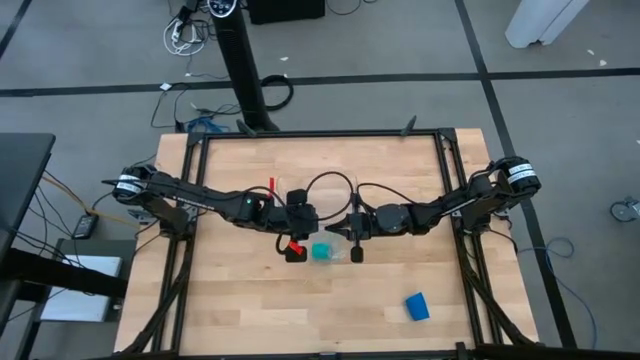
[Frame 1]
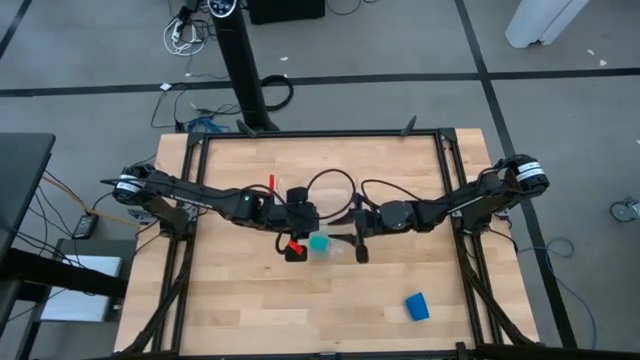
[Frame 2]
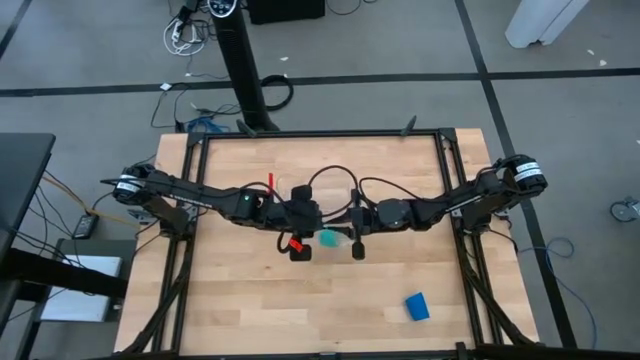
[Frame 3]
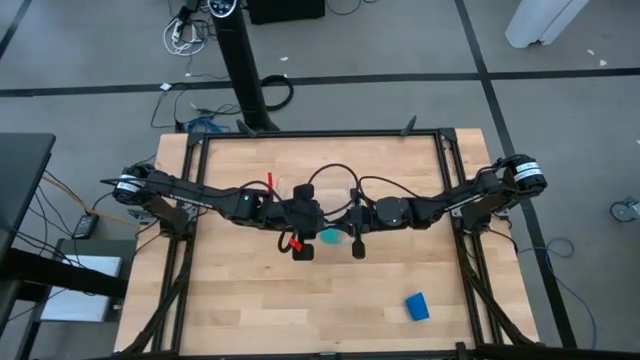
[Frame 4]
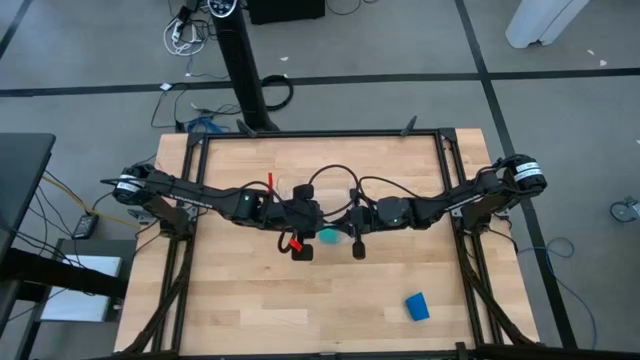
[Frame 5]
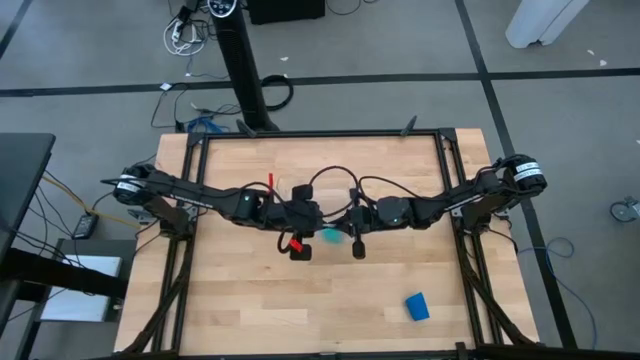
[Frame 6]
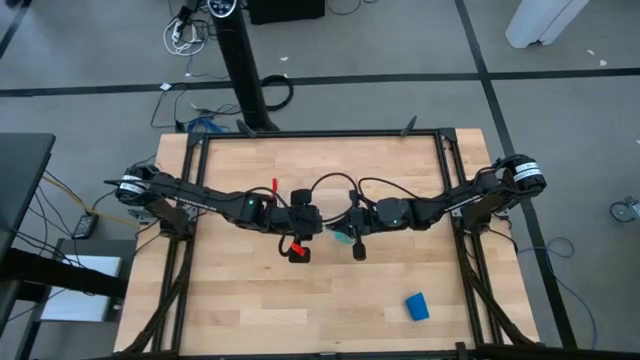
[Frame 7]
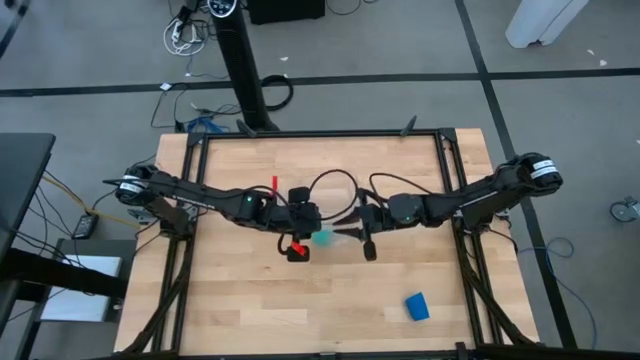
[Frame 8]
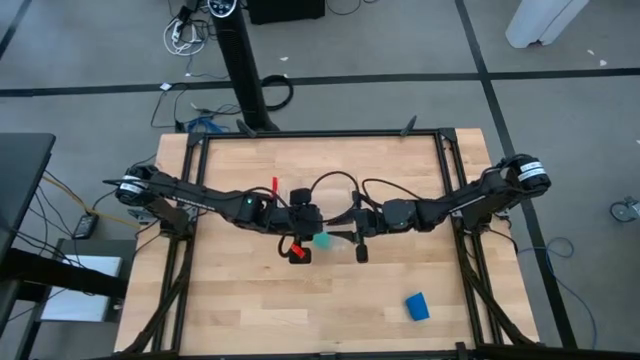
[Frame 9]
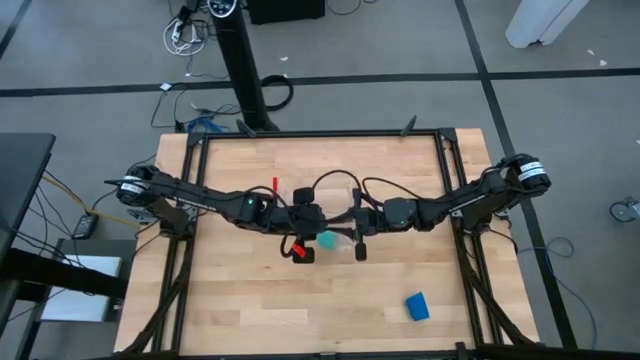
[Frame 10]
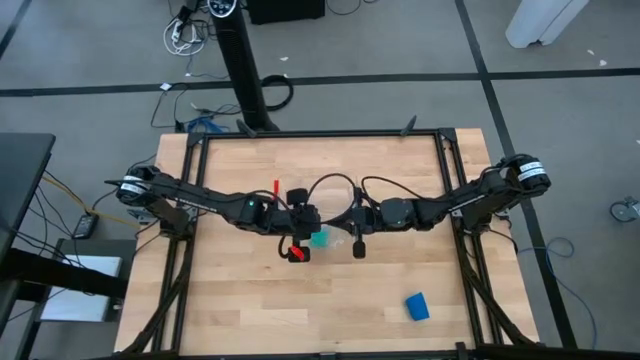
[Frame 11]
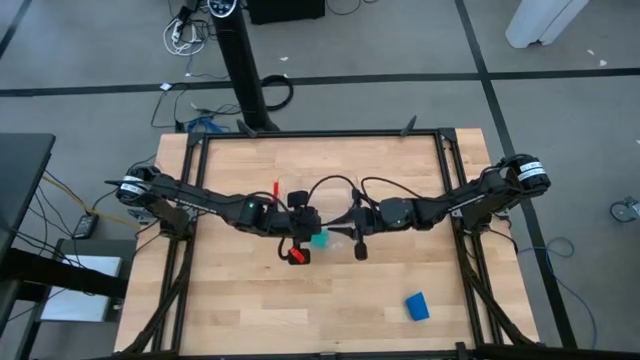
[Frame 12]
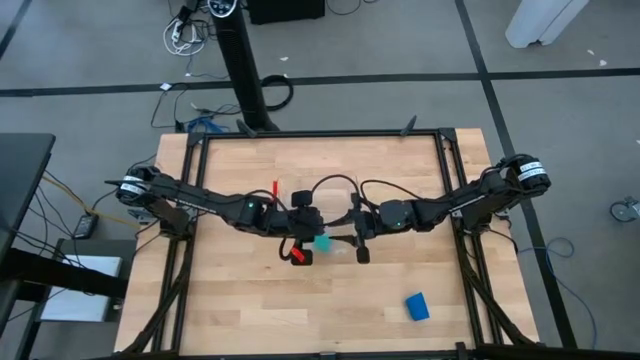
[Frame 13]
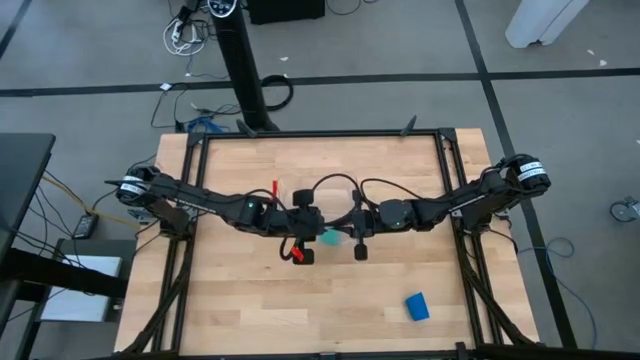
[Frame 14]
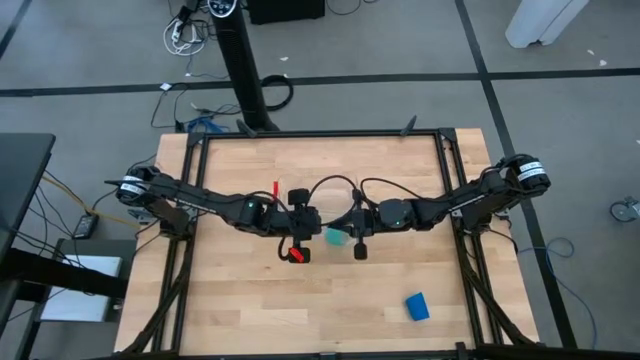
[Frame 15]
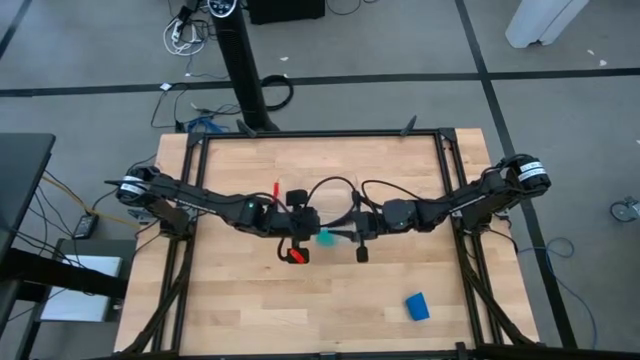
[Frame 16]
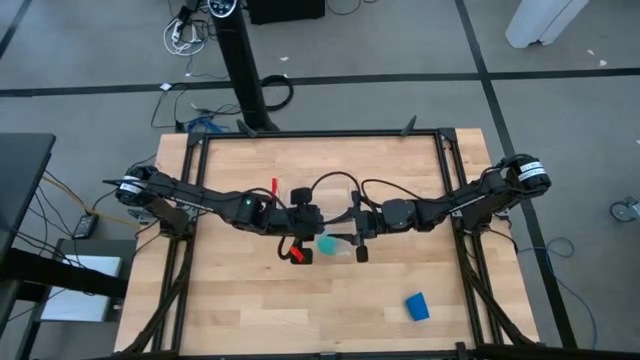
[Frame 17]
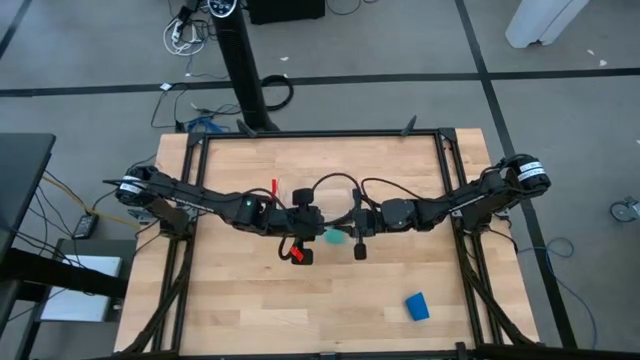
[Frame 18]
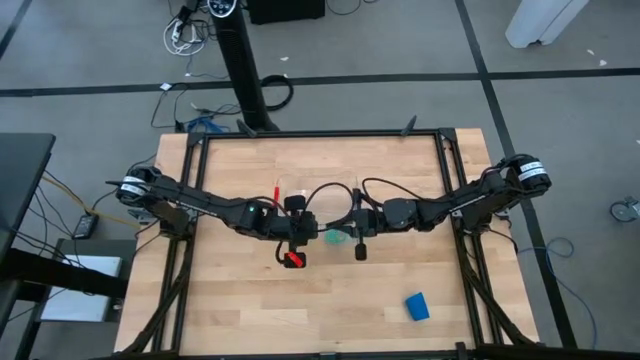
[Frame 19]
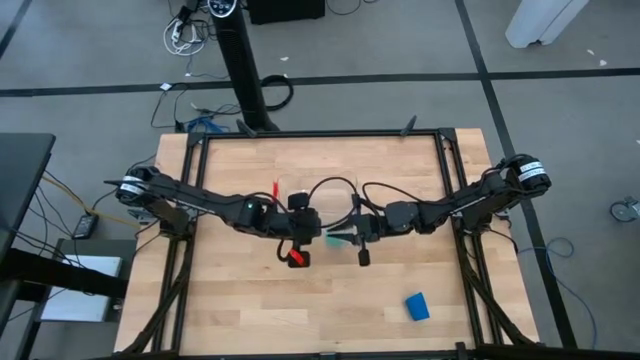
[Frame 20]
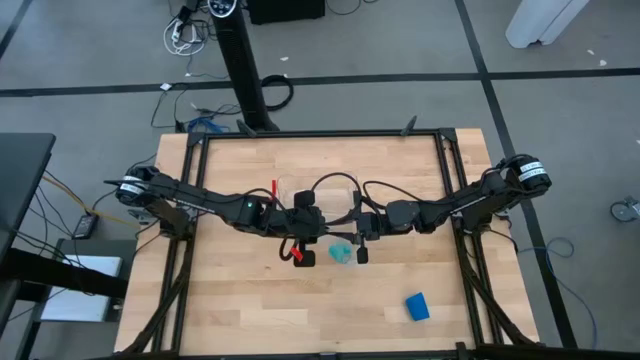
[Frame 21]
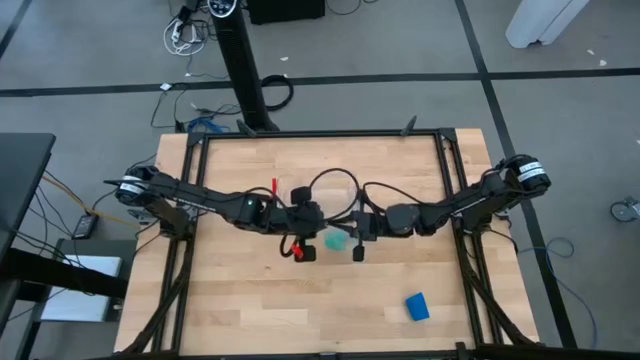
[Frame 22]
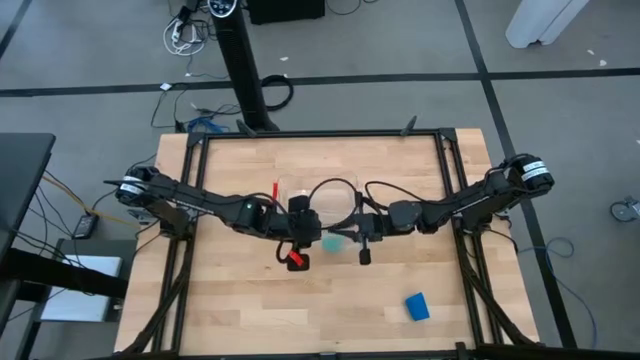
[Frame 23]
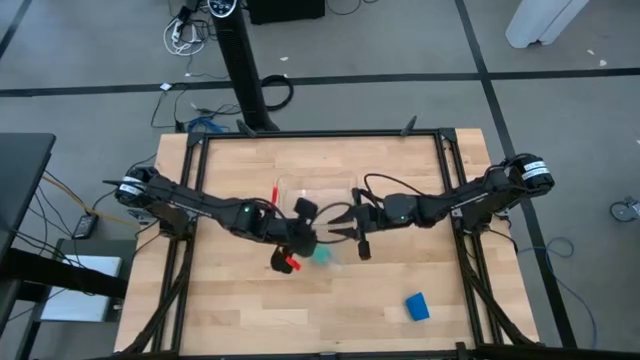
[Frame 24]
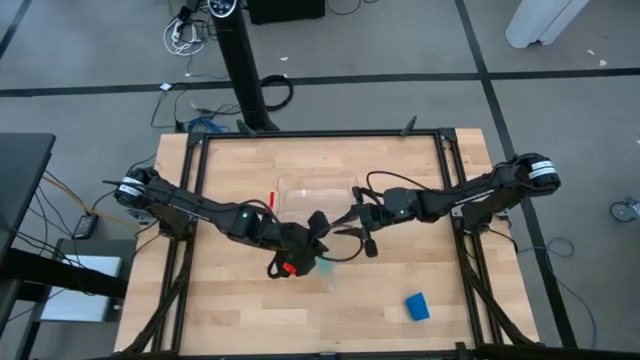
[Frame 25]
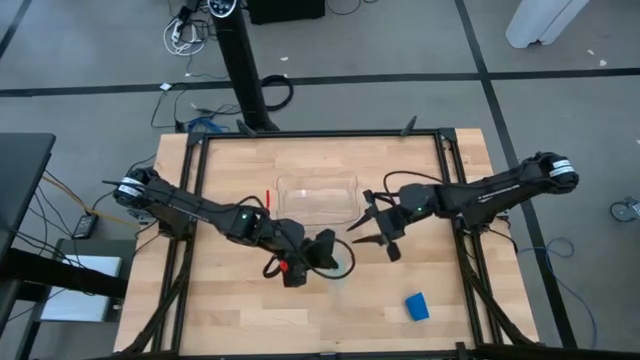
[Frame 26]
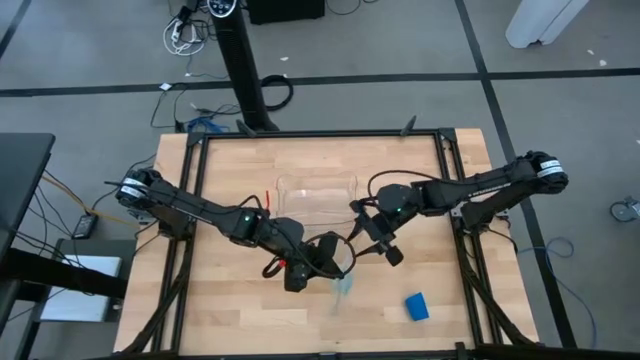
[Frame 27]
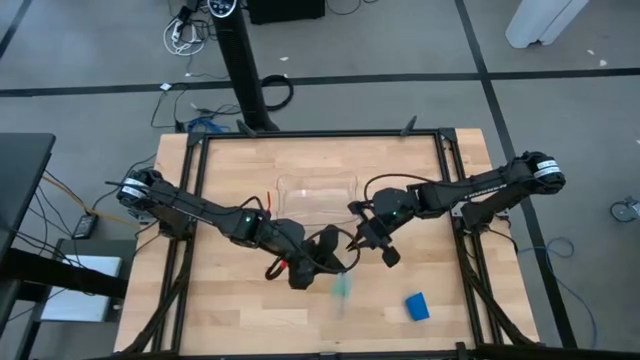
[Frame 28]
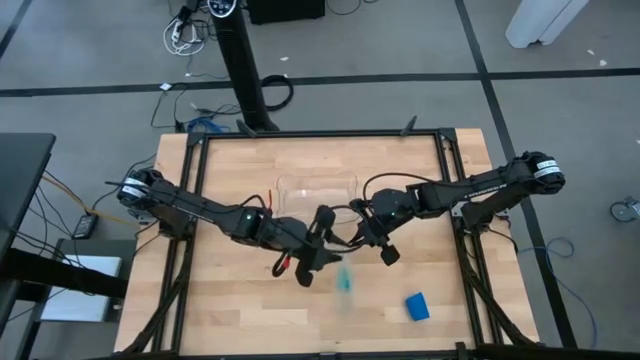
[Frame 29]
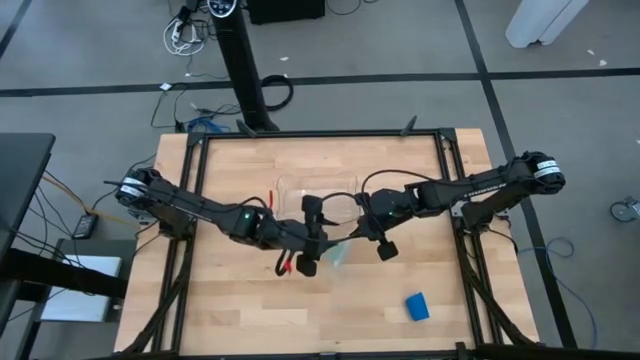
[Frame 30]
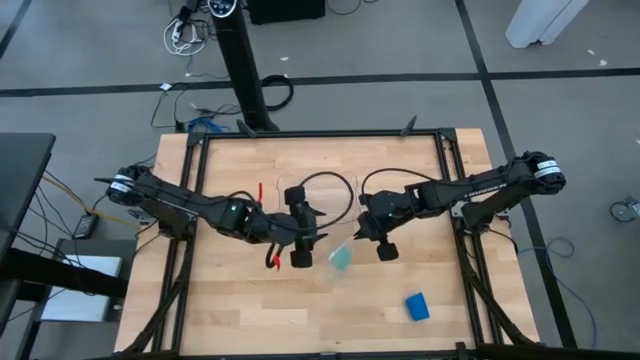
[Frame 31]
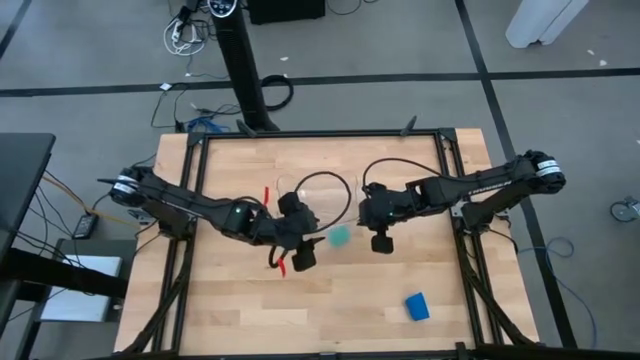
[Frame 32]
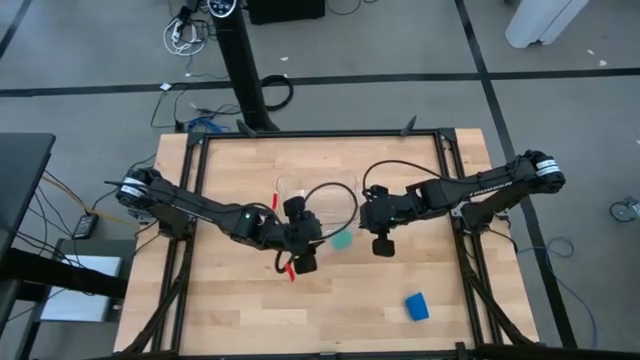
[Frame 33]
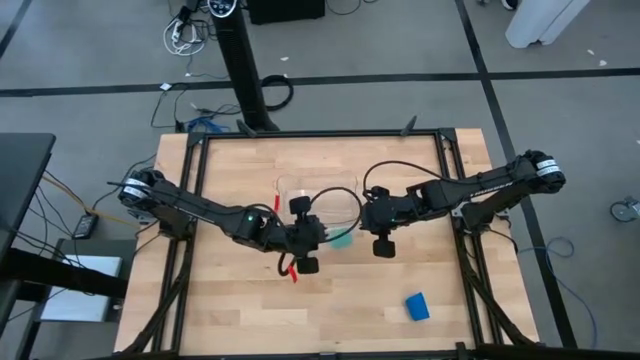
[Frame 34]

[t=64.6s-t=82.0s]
Task: Roll bandage
Open the transparent zip bag

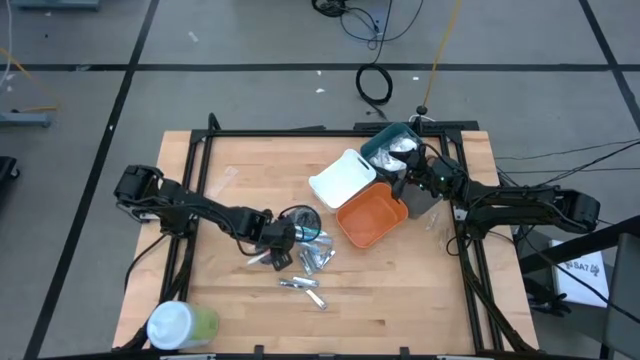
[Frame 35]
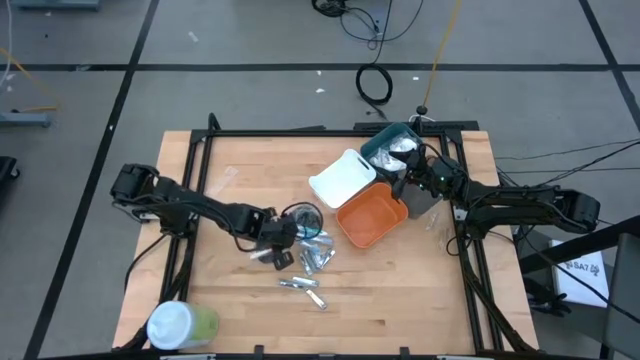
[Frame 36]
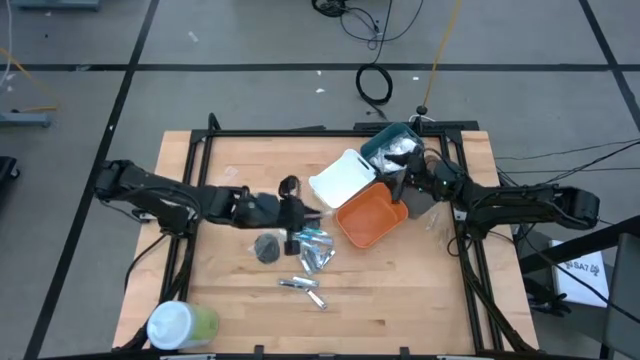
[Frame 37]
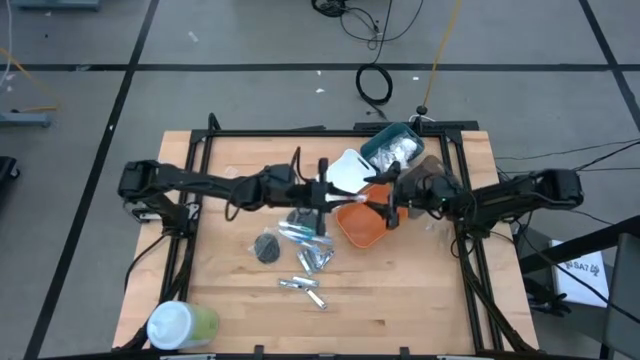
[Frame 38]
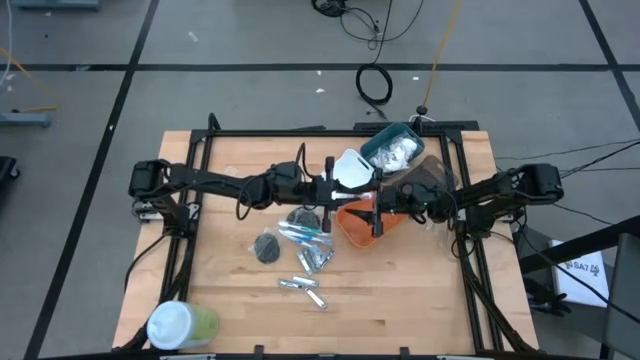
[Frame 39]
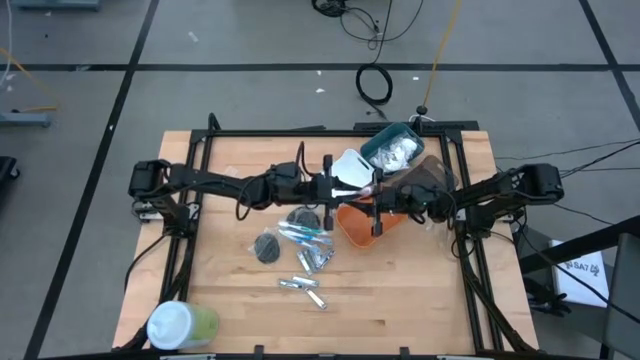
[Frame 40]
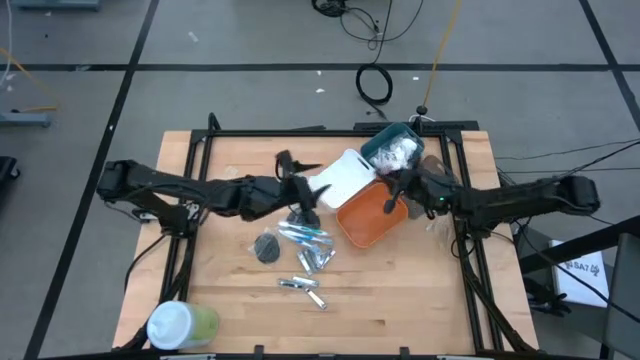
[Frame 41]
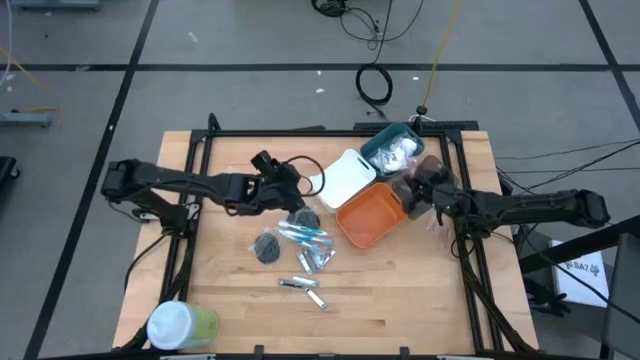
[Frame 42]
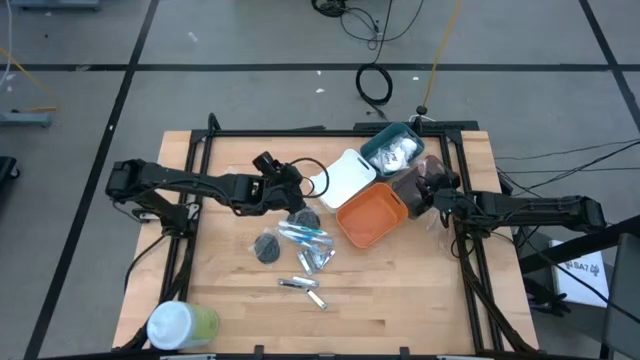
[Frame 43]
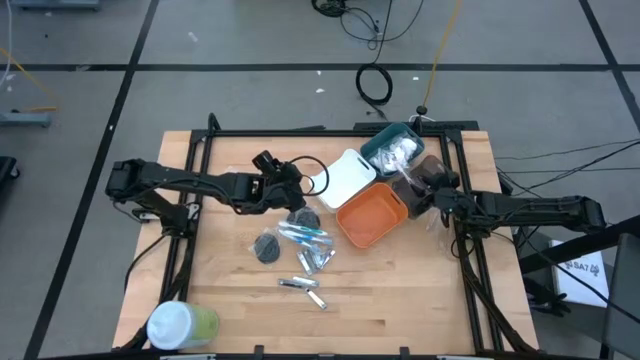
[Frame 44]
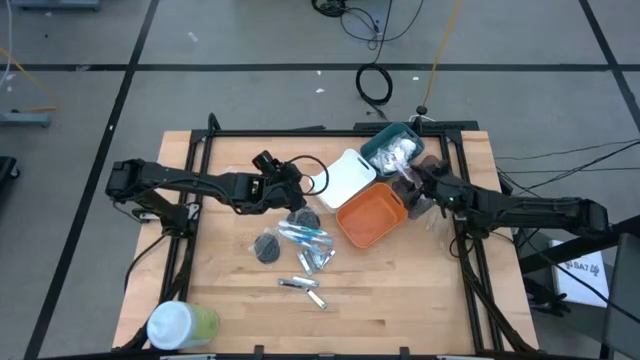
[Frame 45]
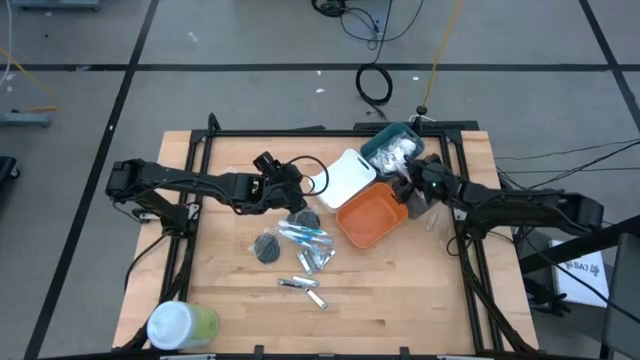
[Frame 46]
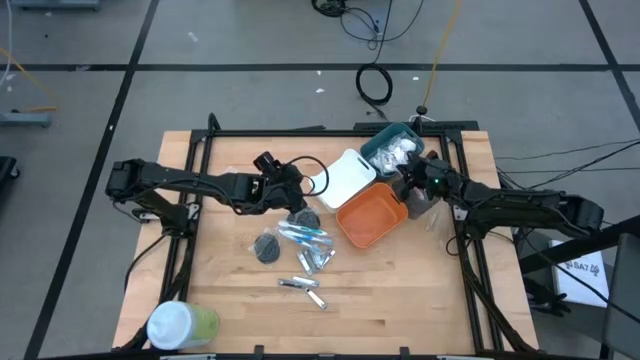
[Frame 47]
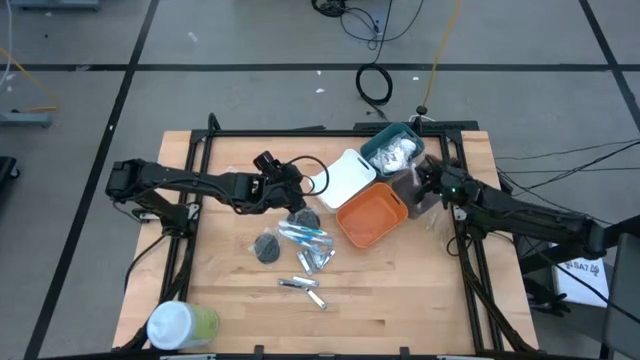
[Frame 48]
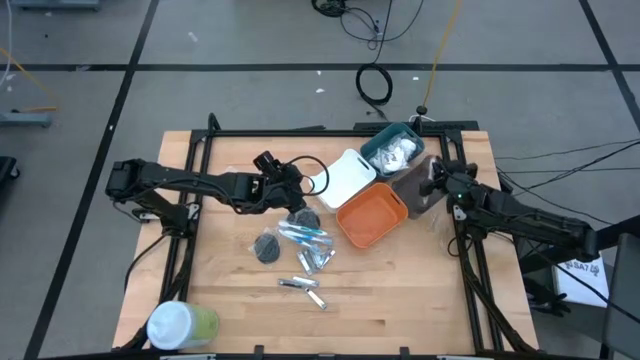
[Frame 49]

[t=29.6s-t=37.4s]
Task: Pick & Place Travel size toiletries
Put the orange toothbrush into the black bin
